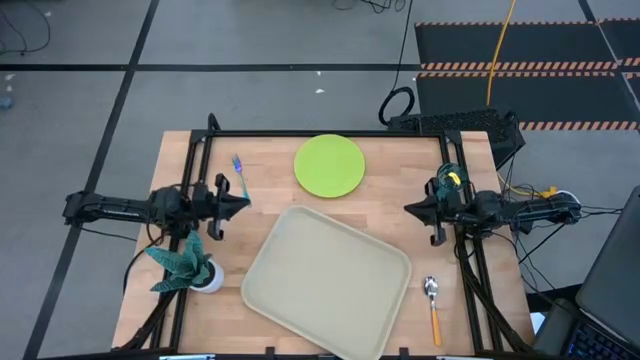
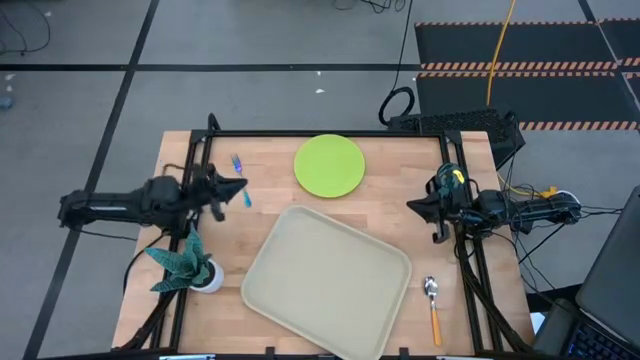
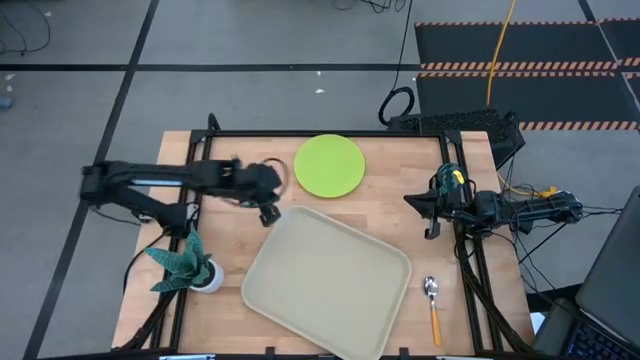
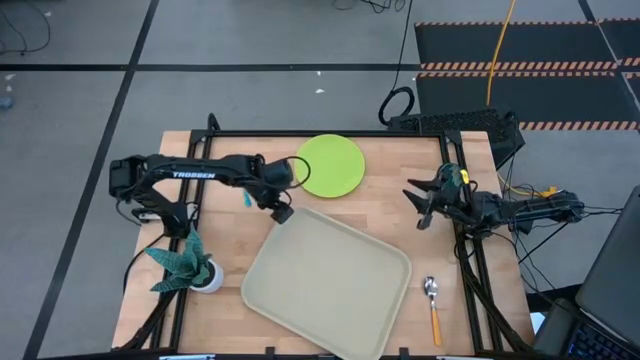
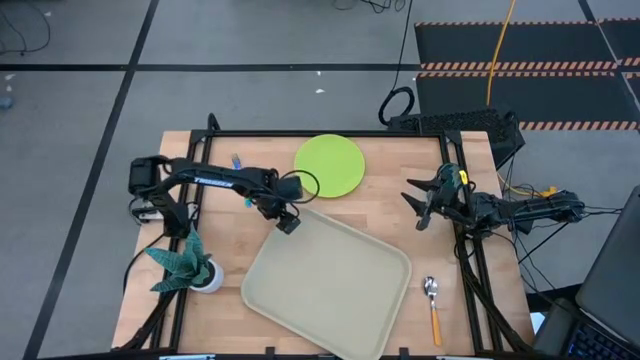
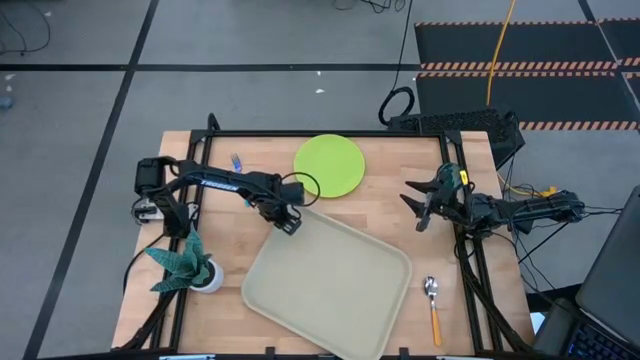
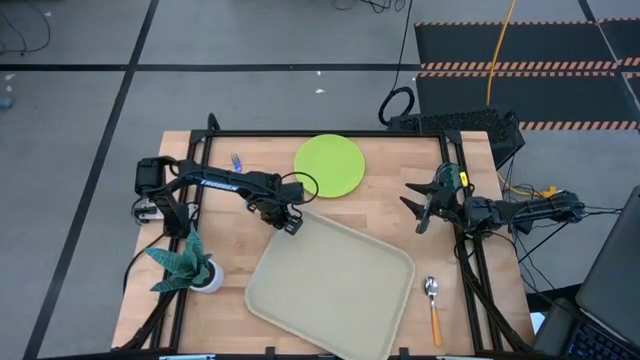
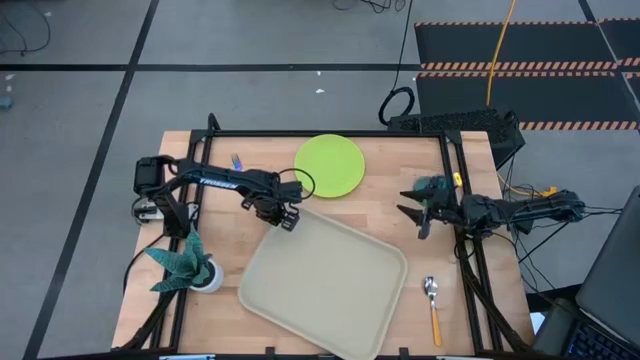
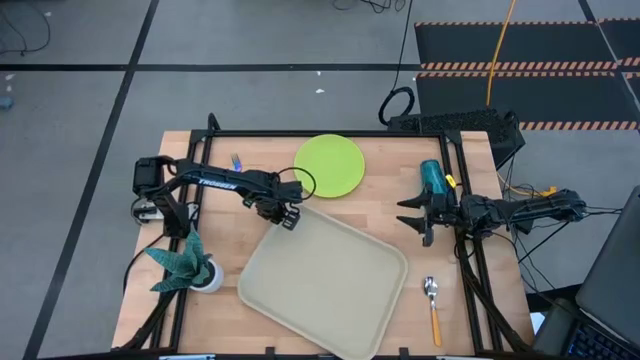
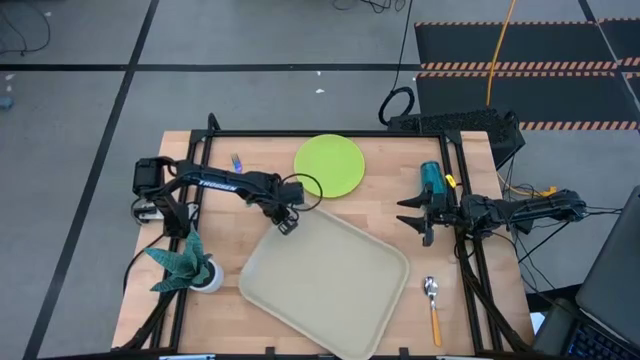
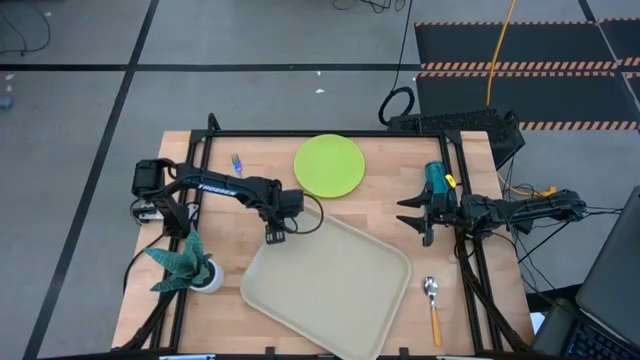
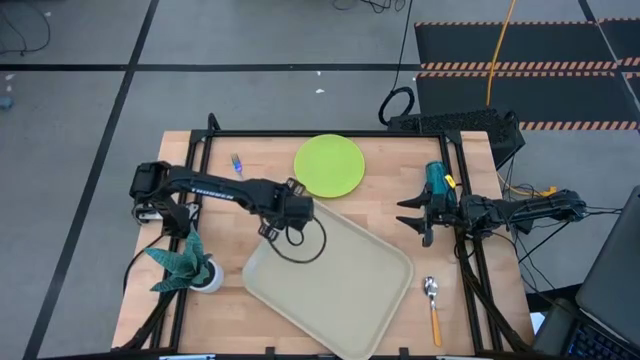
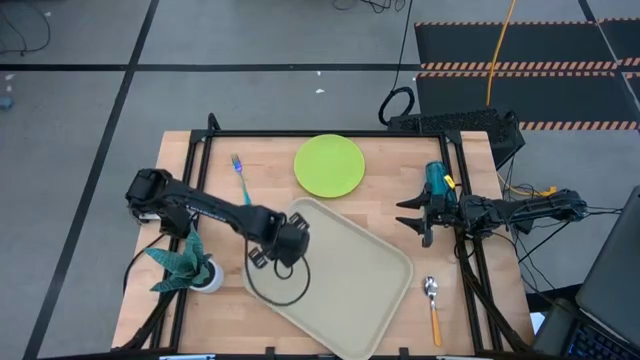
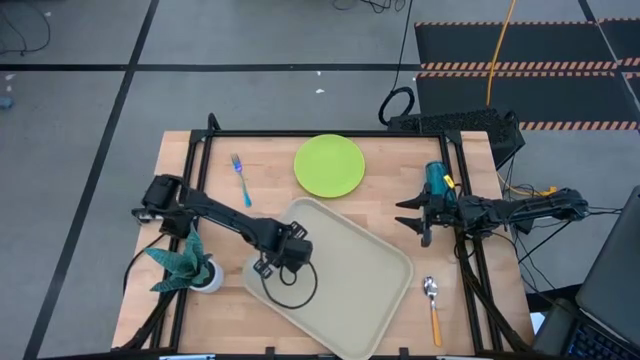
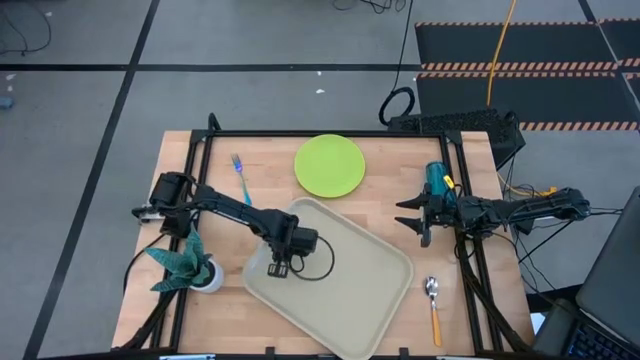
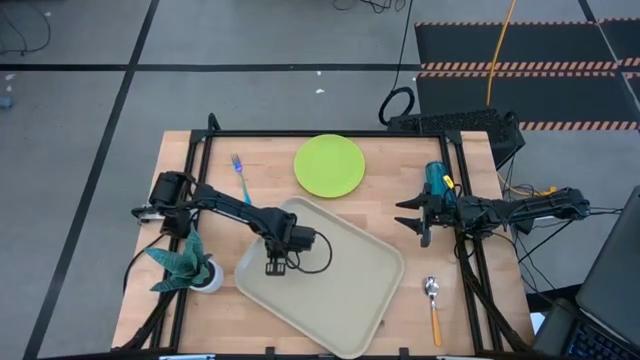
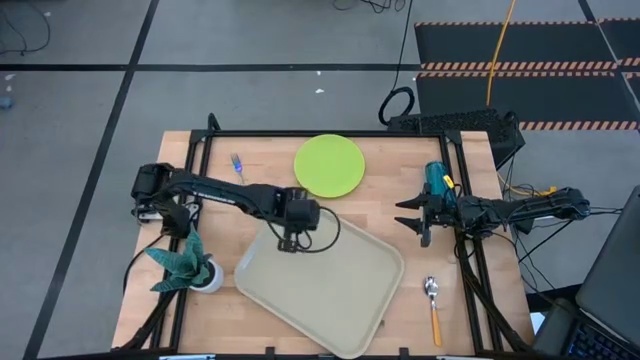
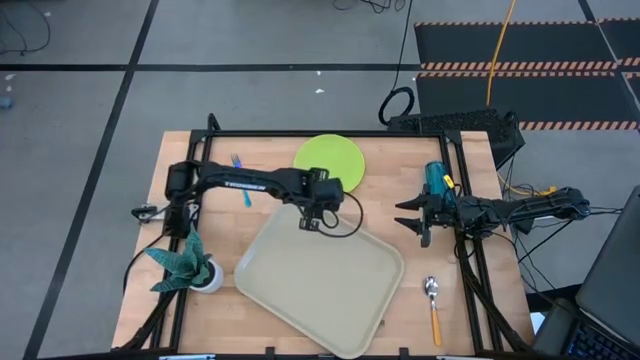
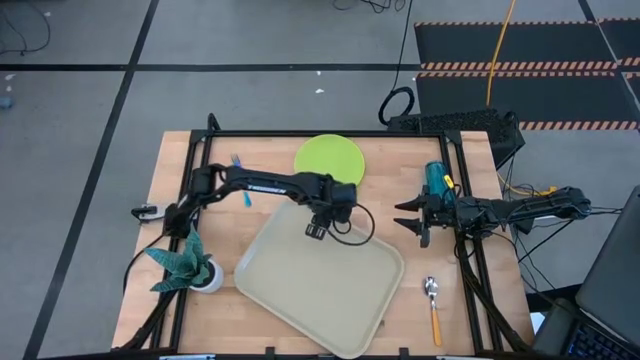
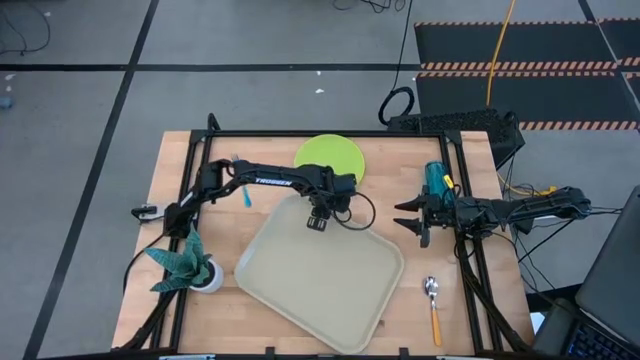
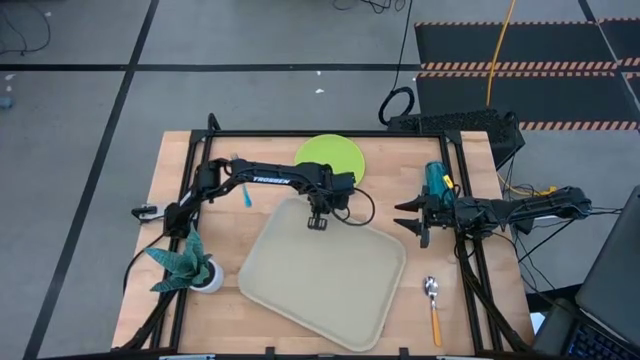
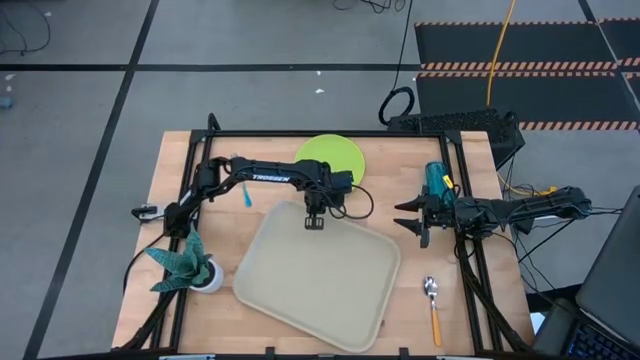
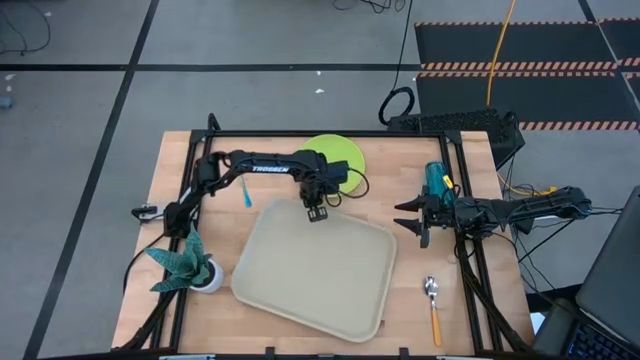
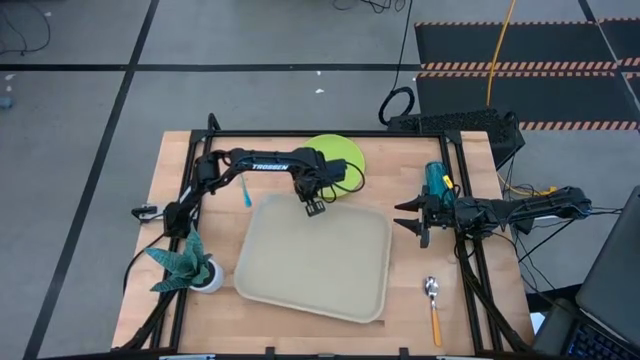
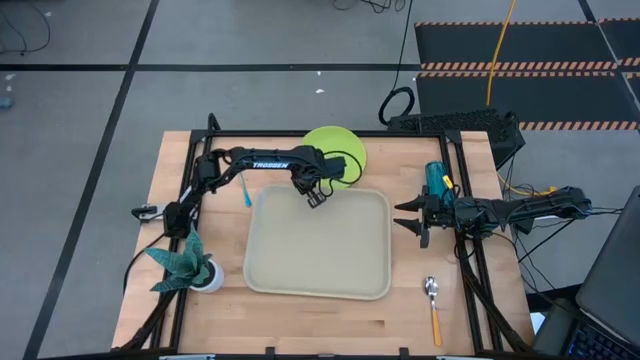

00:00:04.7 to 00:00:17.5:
Task: Pick and place plate/cup/fork/spoon on tray
Move the gray serving tray to the center of the table

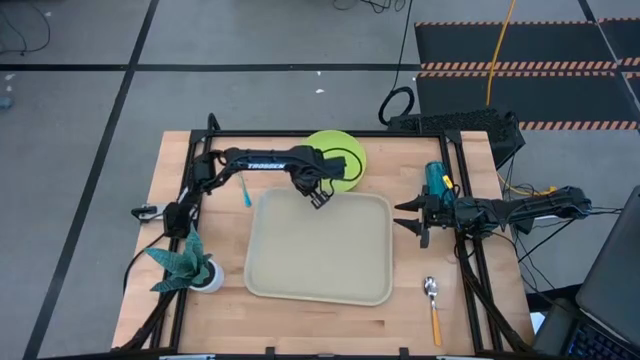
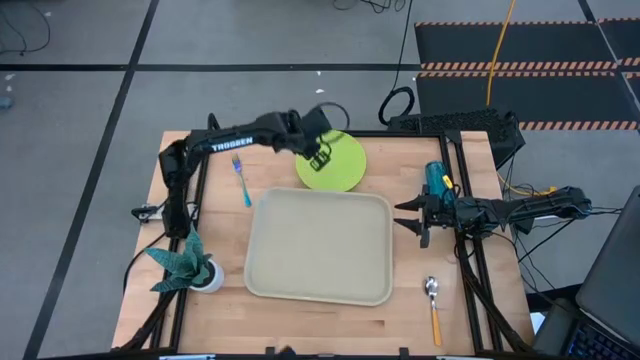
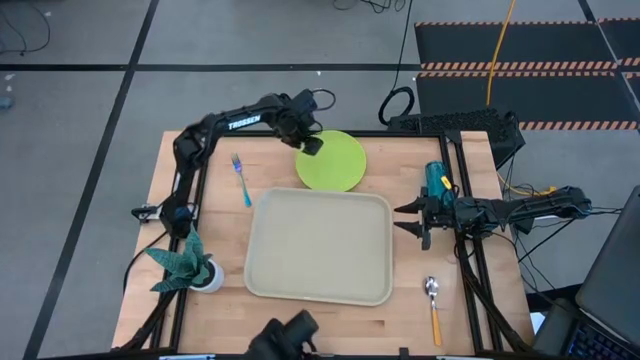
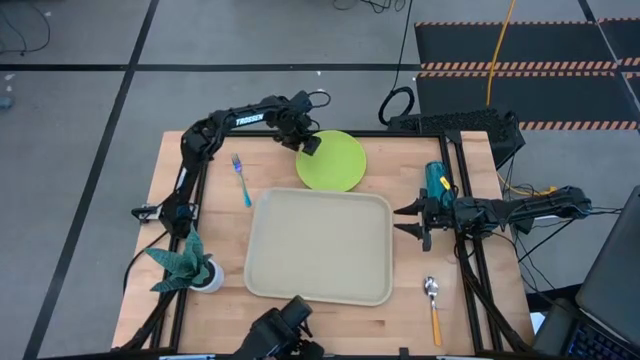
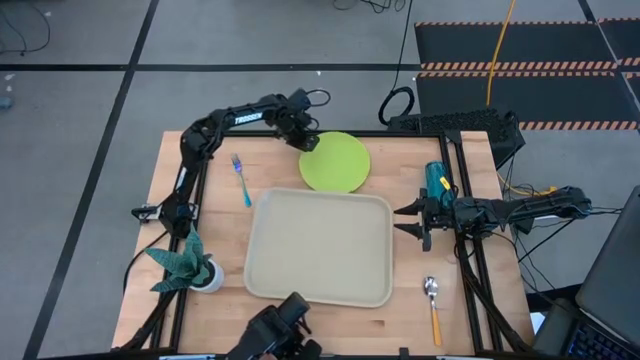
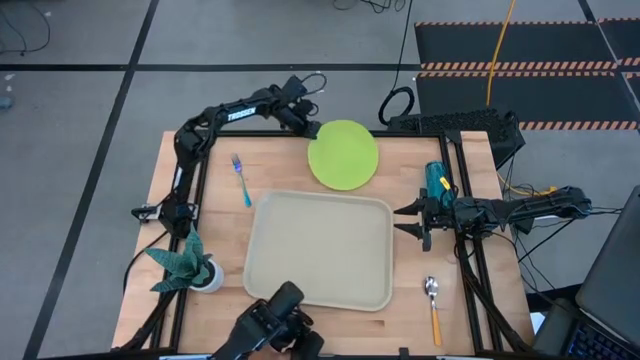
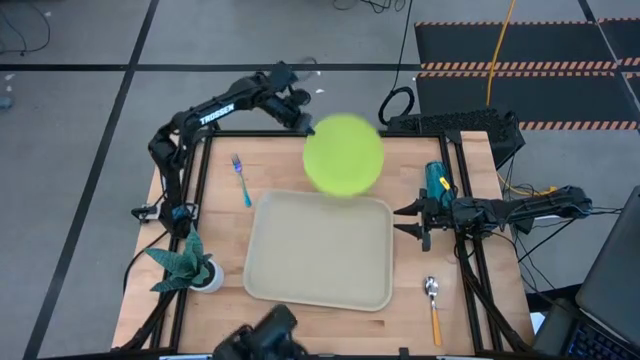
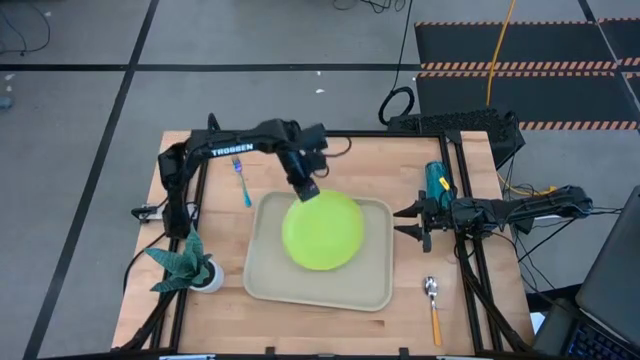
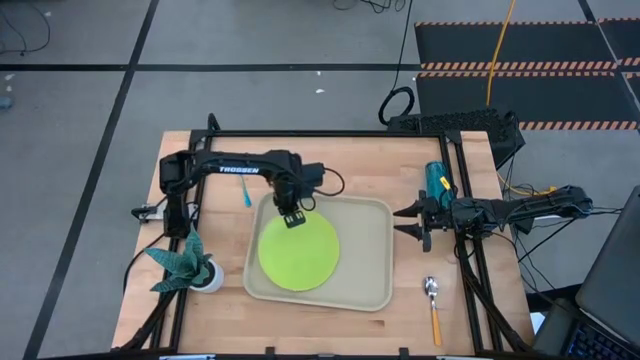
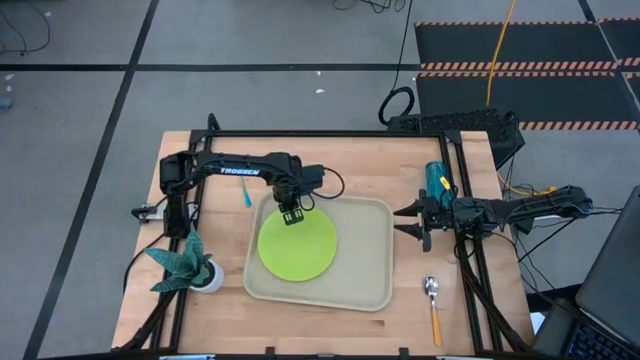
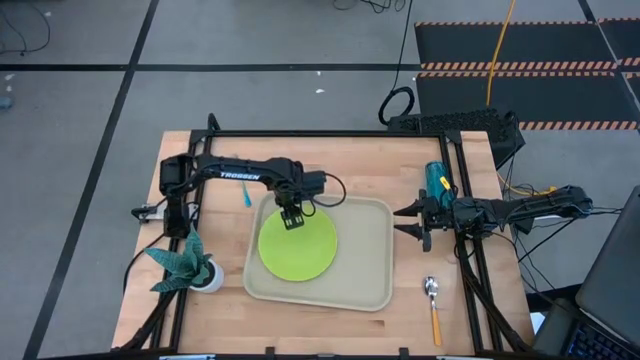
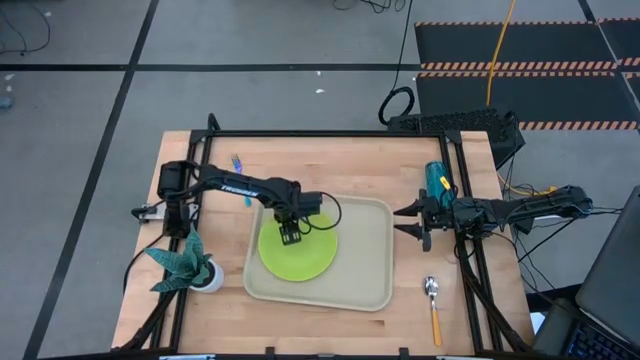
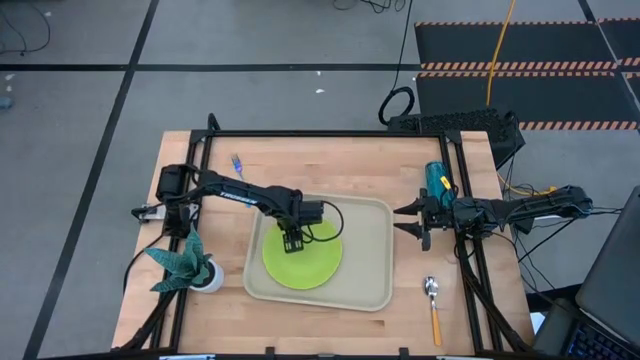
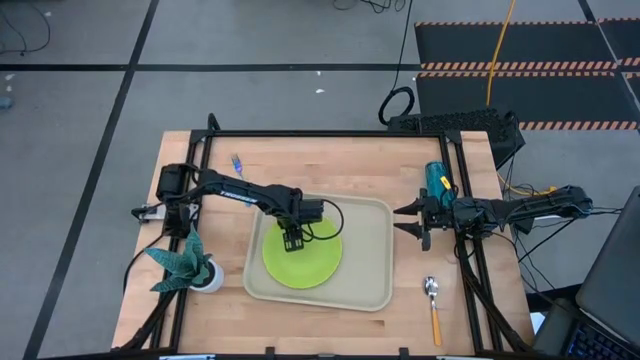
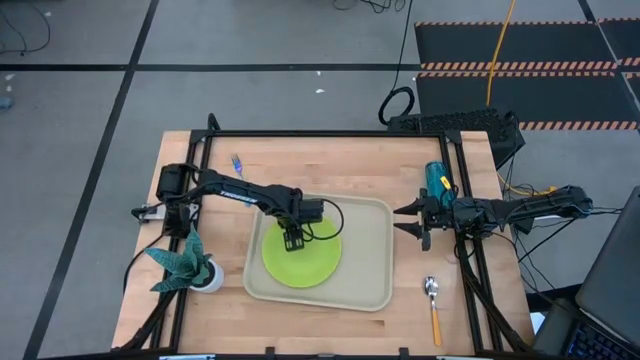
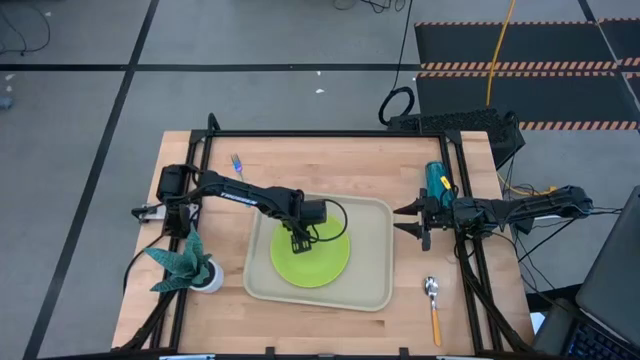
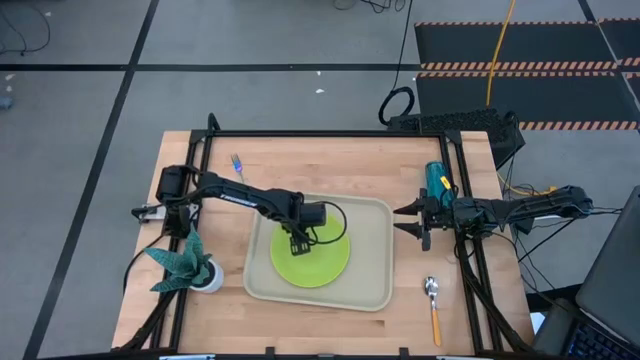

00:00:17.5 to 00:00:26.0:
Put the green plate on the gray serving tray
